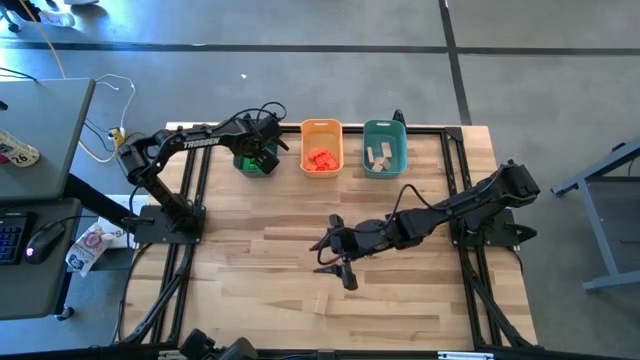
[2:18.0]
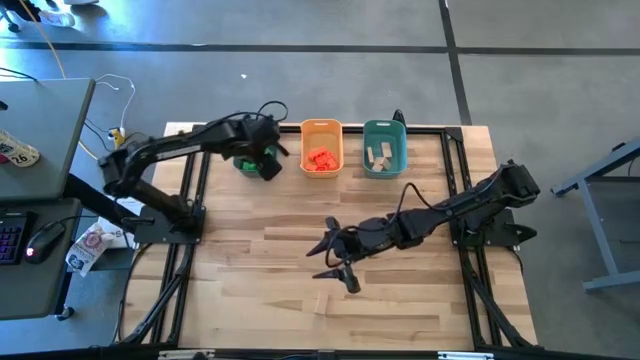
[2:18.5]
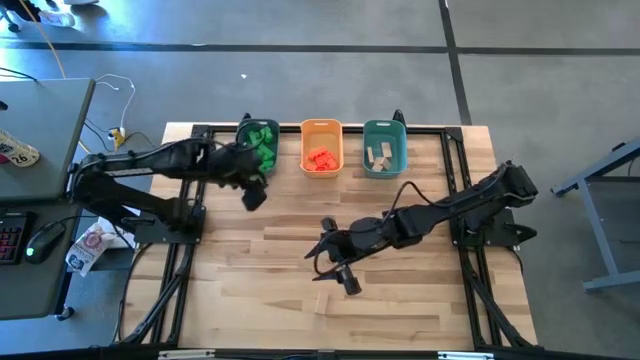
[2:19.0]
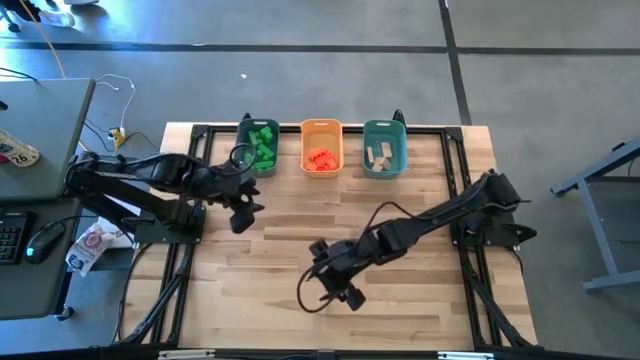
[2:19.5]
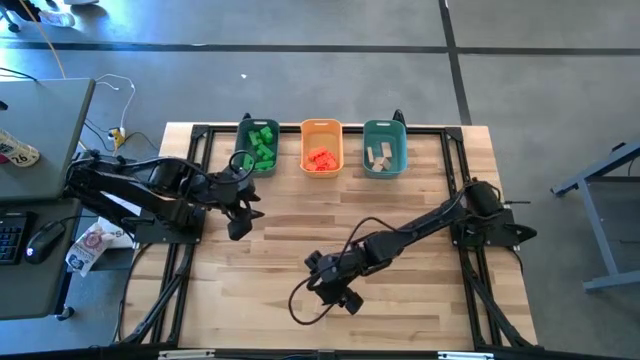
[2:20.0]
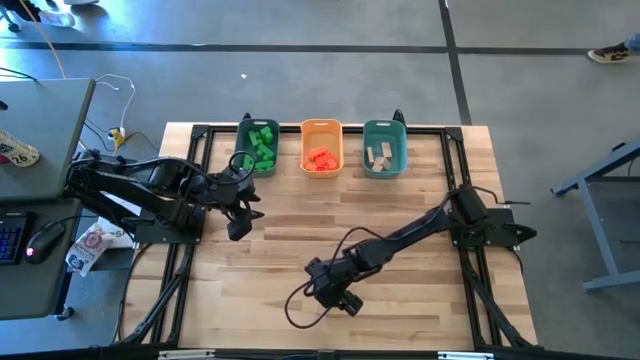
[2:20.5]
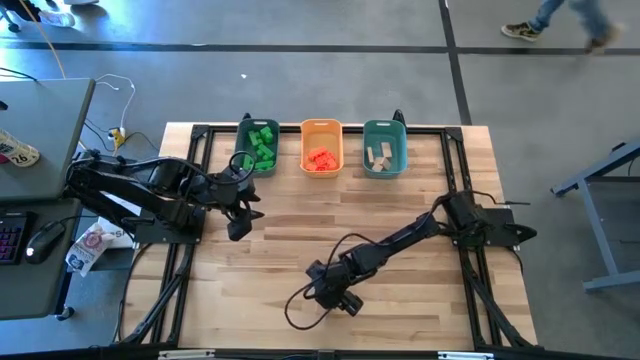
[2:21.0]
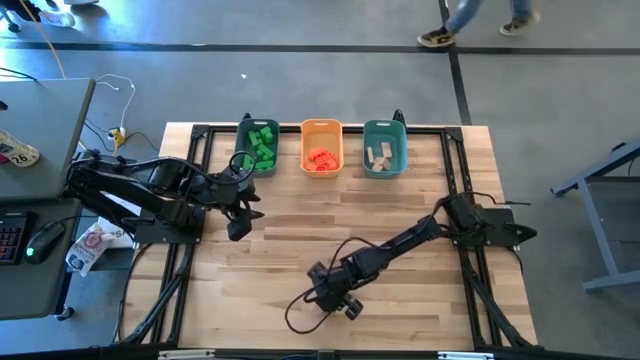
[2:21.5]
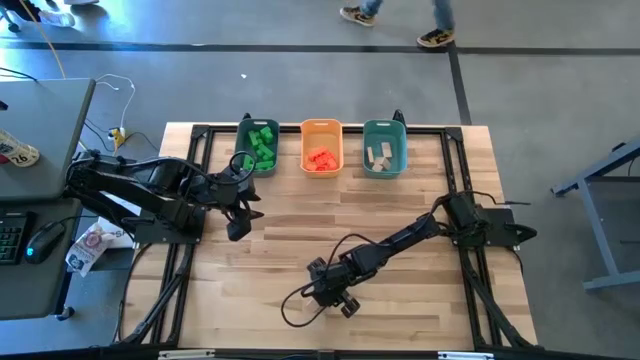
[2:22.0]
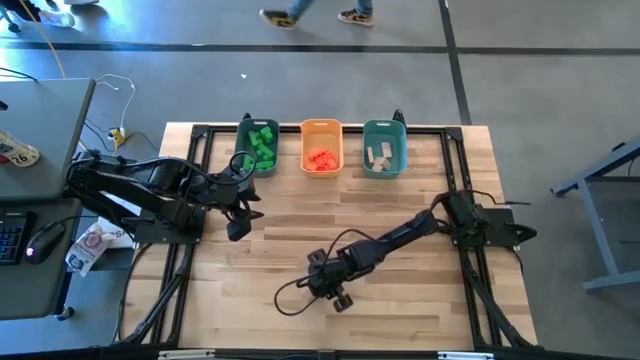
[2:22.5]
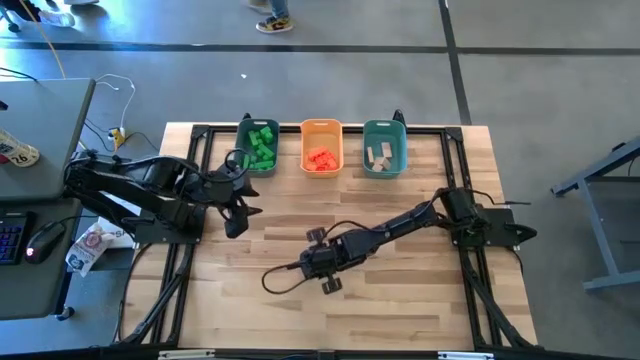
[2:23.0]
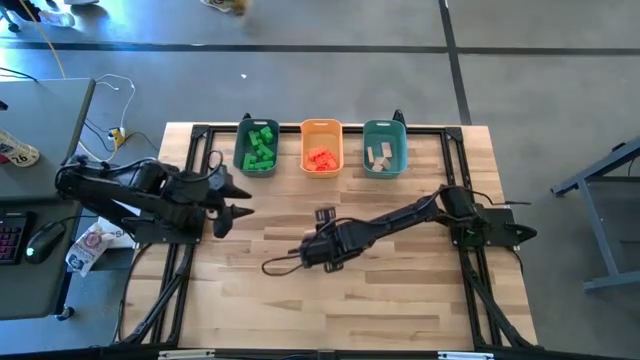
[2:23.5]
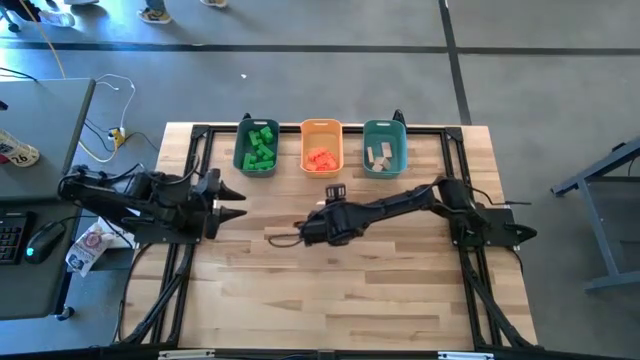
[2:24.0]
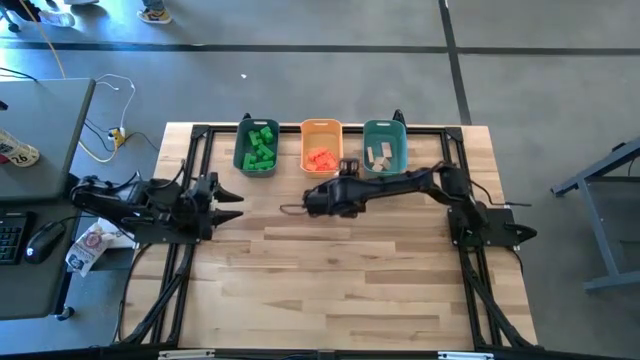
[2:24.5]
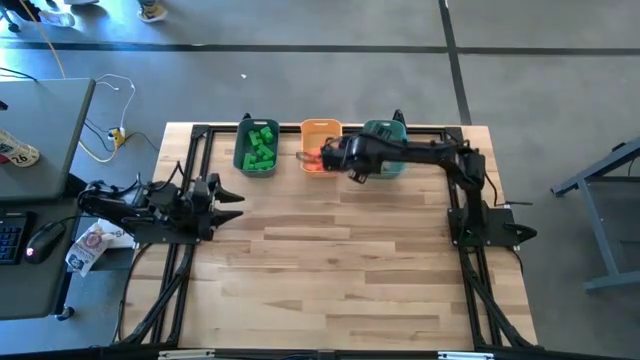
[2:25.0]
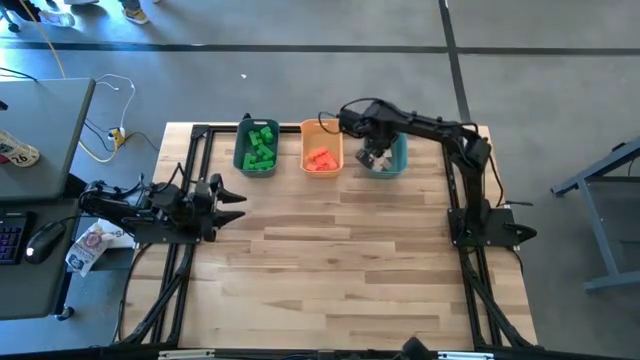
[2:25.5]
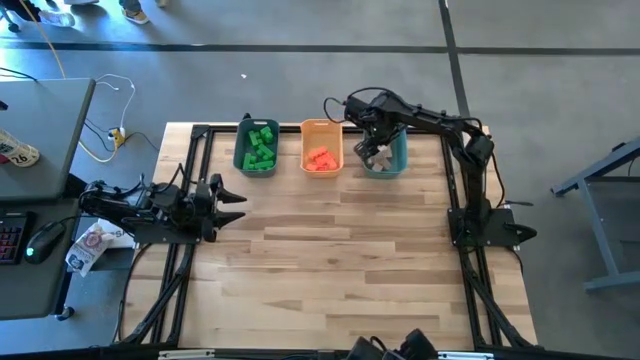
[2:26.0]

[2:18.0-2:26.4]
Task: Sort & place blocks by color
Put the brown blocks into the green bin

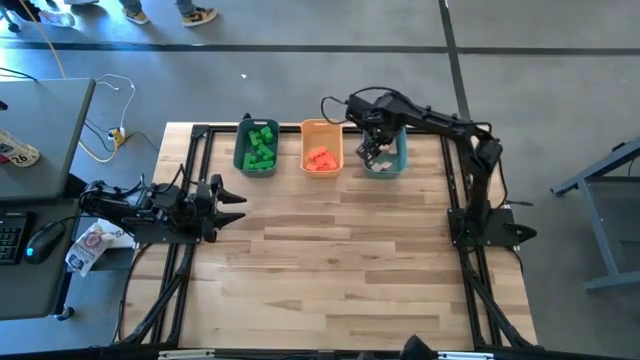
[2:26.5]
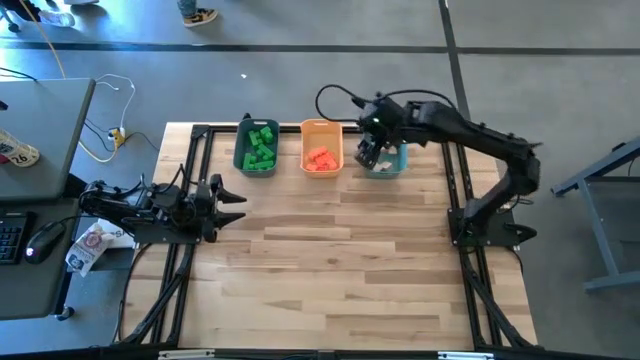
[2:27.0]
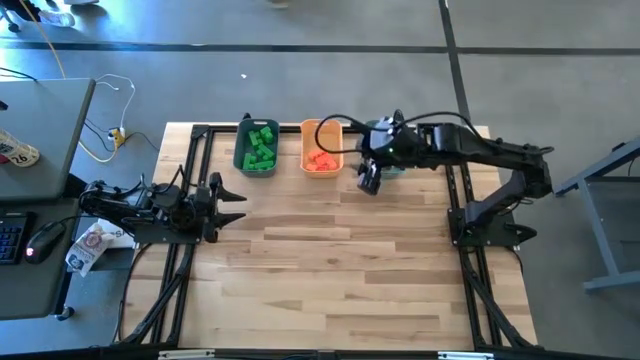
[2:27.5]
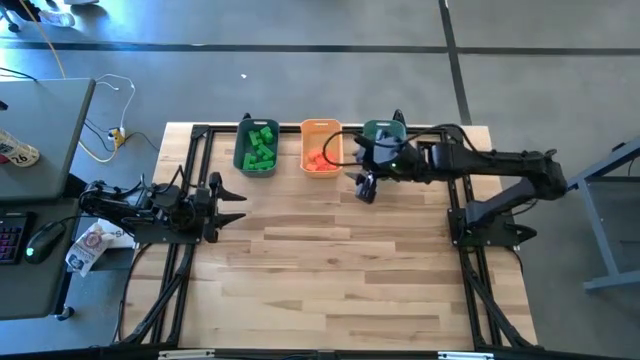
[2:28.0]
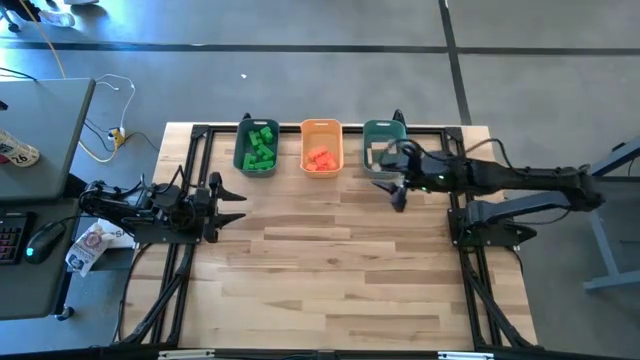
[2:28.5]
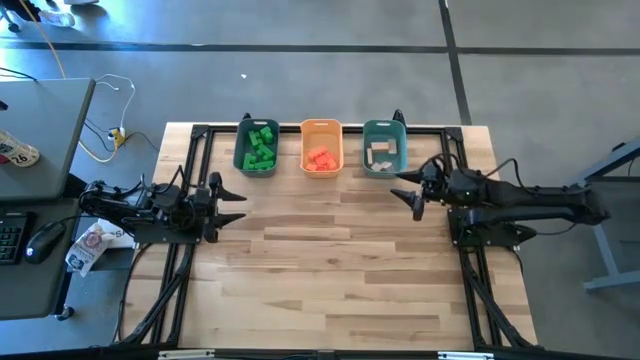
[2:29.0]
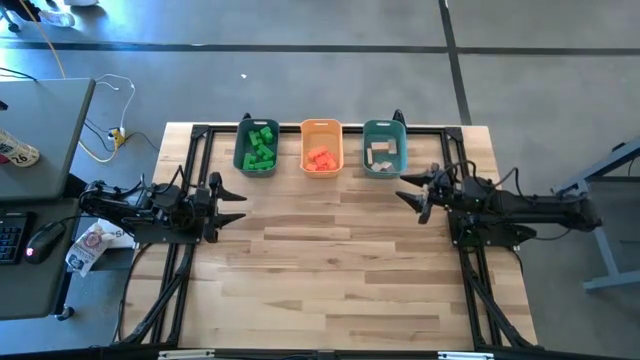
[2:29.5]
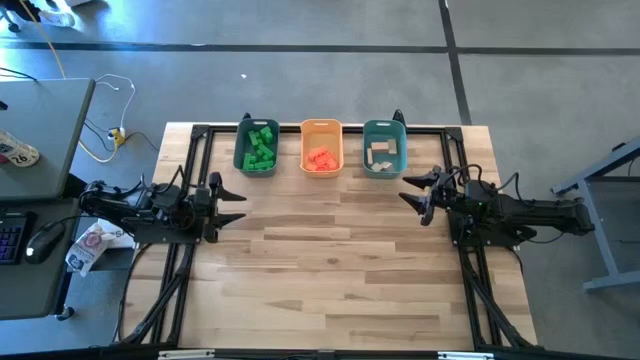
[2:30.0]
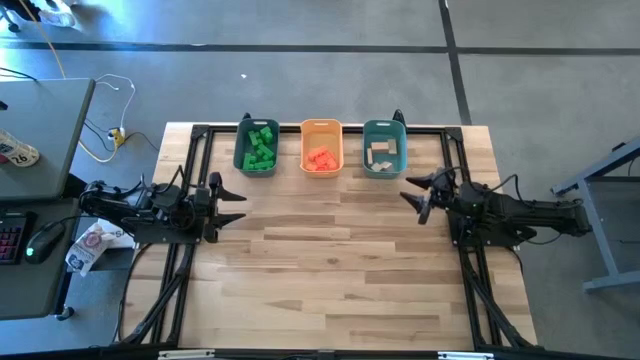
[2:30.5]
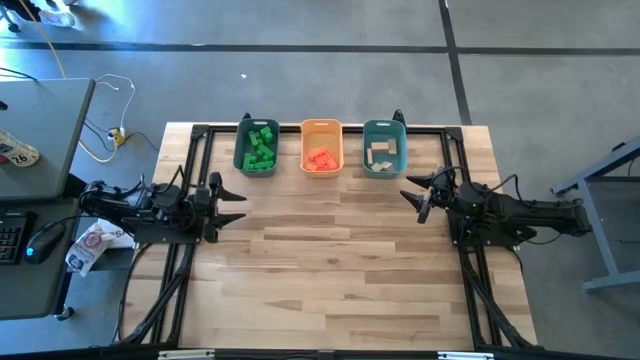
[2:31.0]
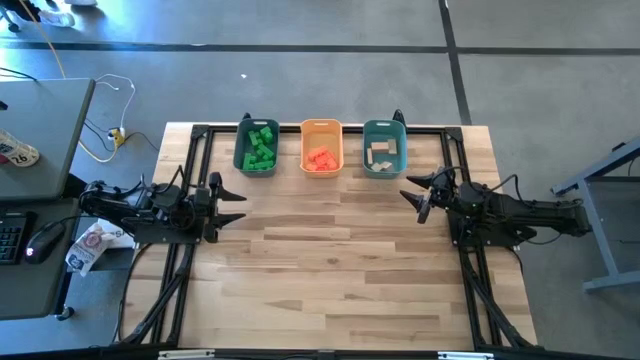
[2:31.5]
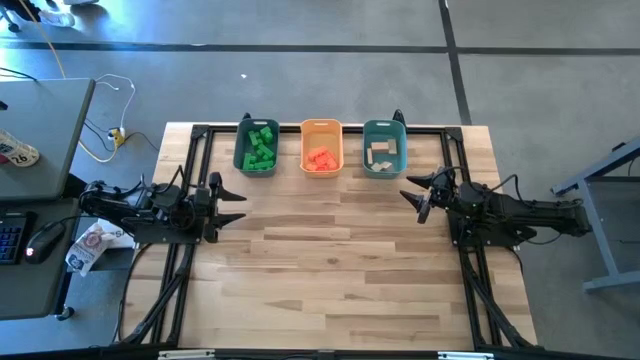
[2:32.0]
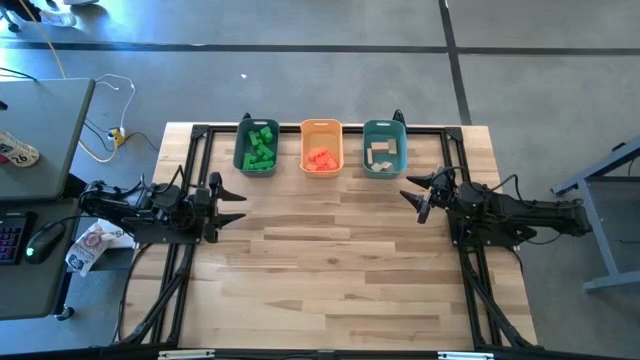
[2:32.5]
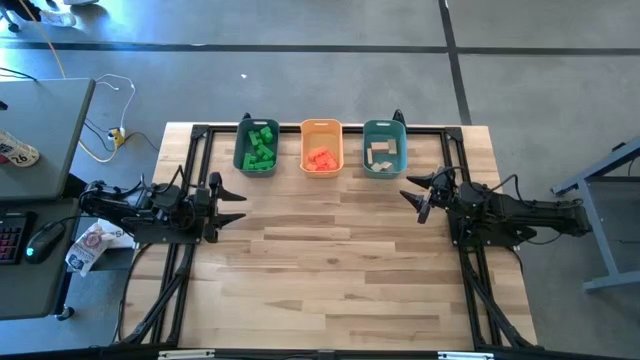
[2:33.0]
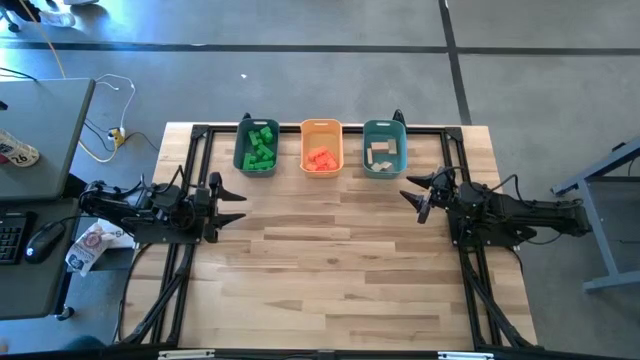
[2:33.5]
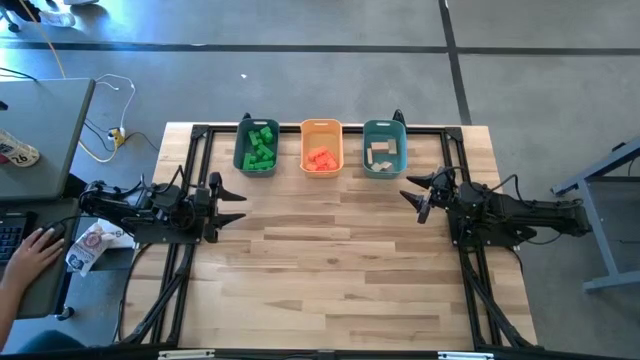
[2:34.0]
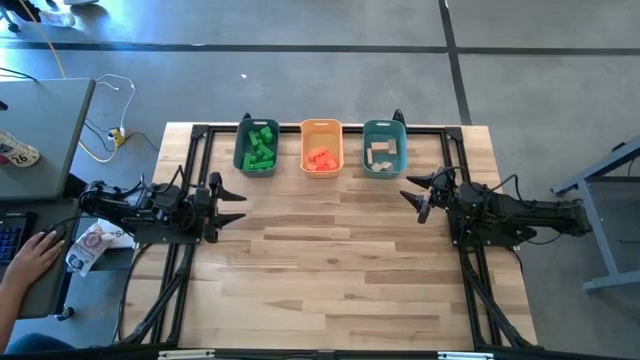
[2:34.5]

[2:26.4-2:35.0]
Return to Home Position

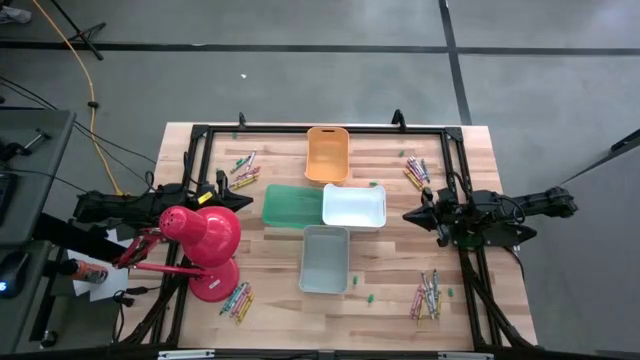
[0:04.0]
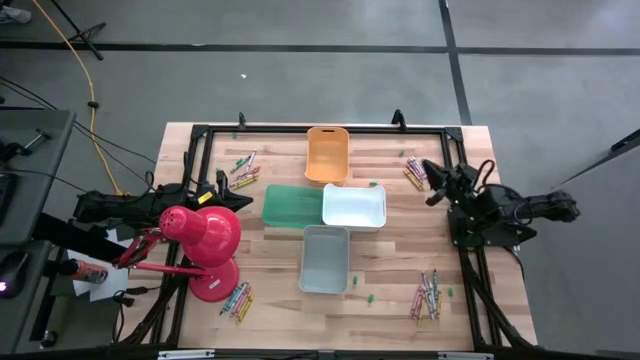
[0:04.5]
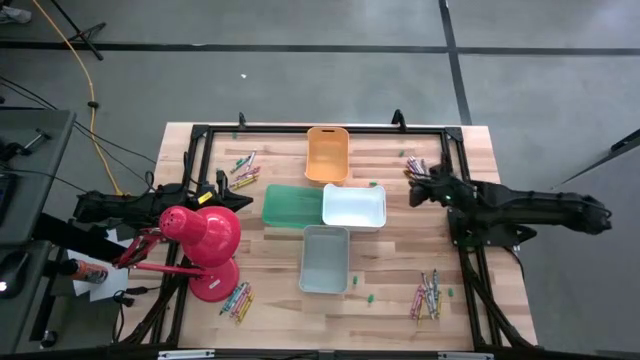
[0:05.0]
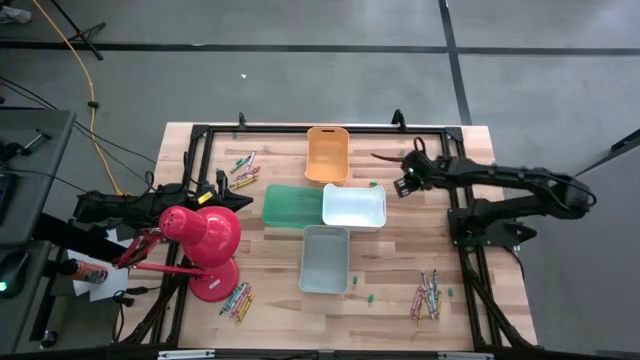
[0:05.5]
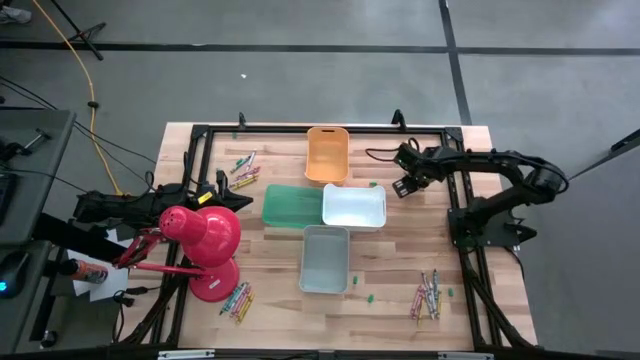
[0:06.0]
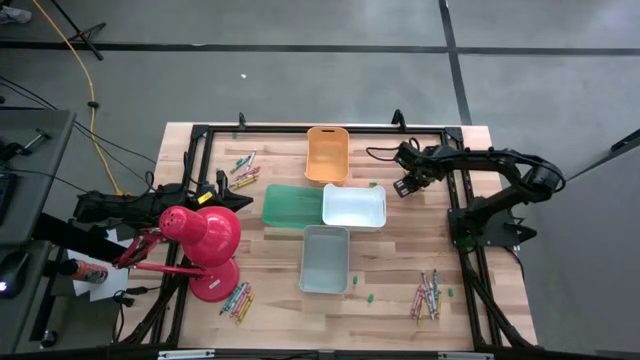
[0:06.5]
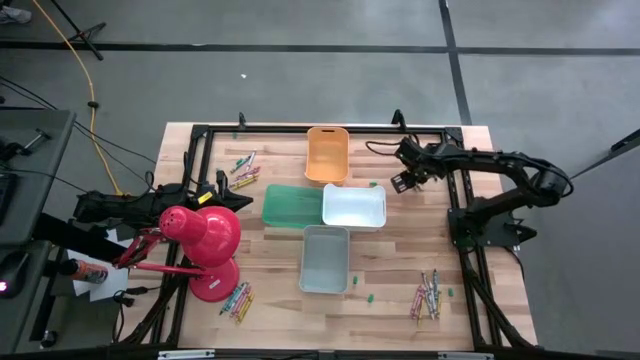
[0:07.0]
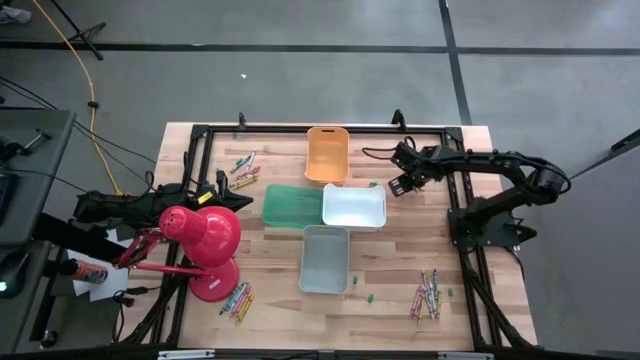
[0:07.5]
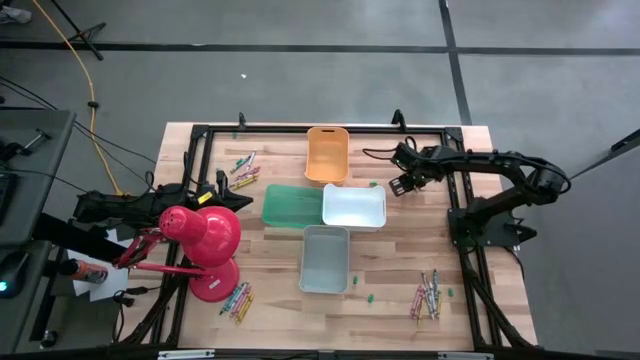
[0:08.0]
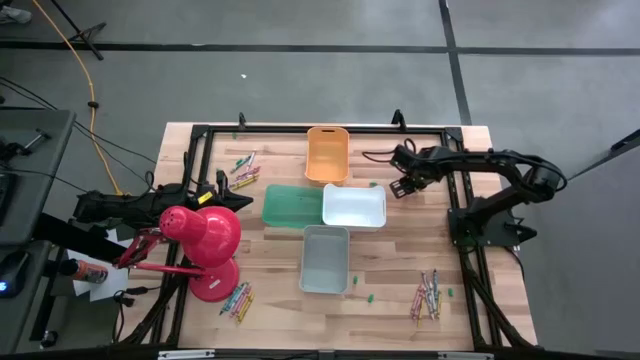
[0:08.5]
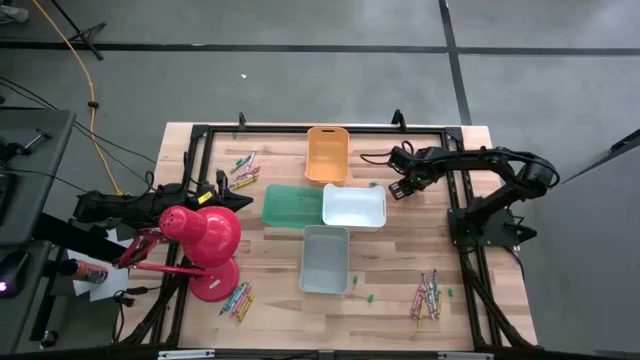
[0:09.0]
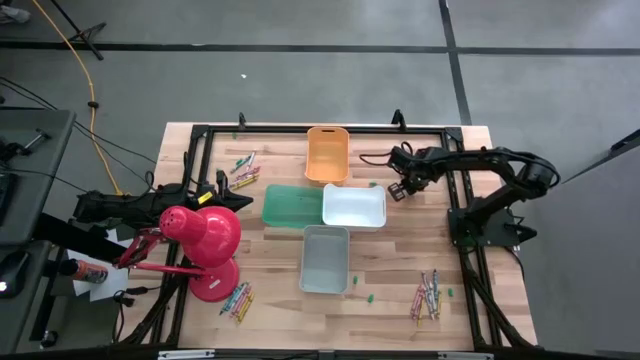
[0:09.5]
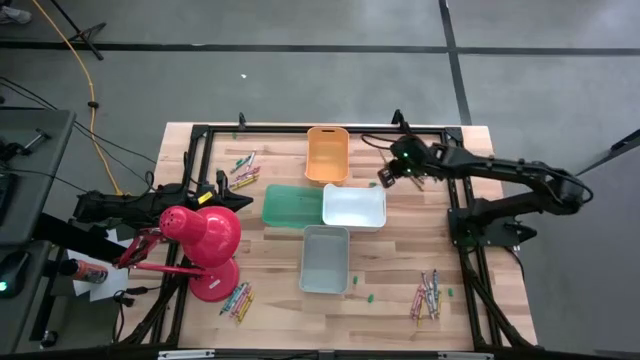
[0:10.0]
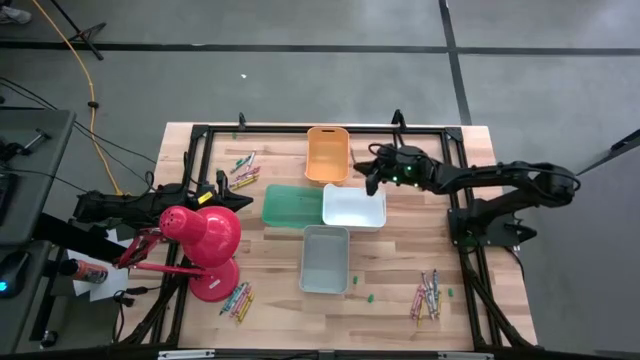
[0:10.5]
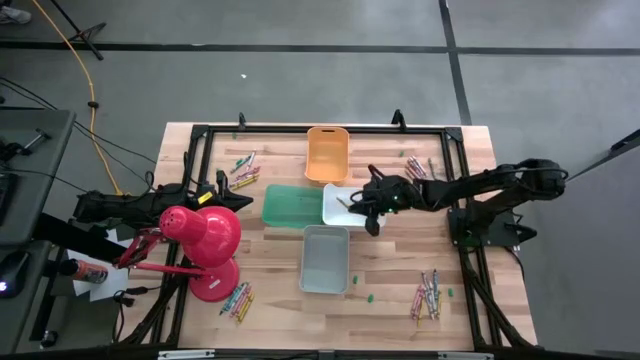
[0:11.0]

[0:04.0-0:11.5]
Task: Sort crayons
Put the yellow crayon into the white bin
